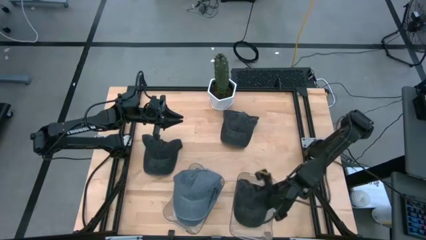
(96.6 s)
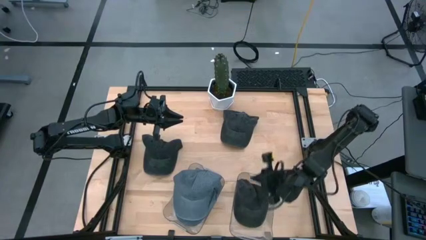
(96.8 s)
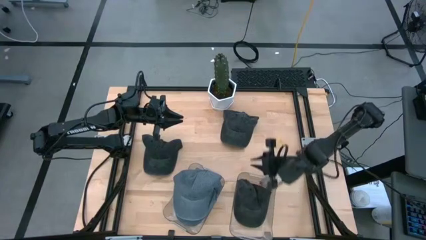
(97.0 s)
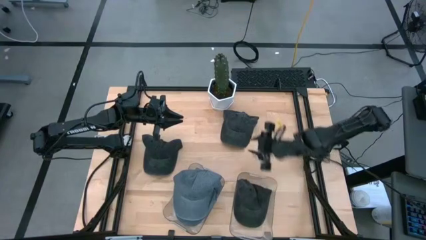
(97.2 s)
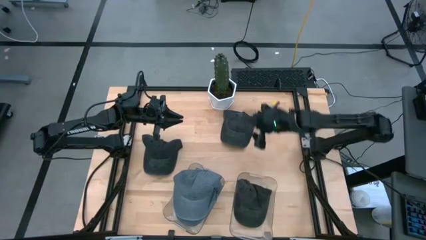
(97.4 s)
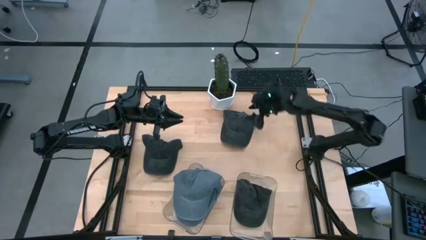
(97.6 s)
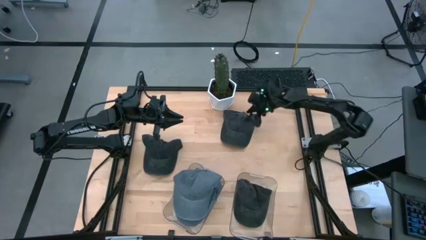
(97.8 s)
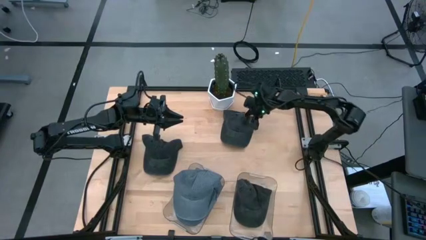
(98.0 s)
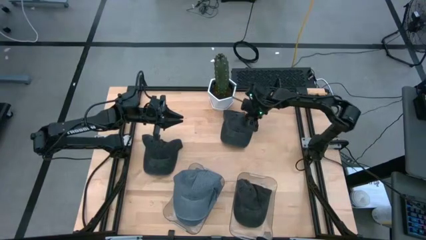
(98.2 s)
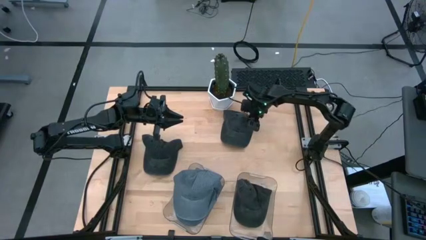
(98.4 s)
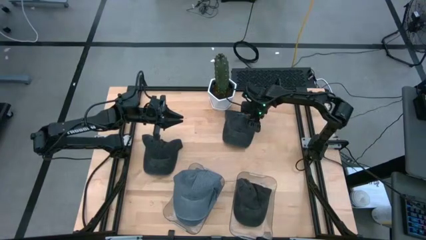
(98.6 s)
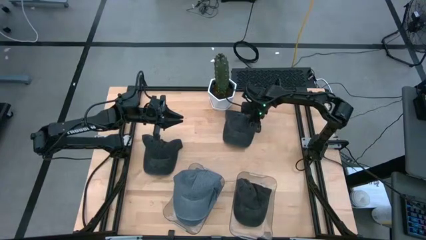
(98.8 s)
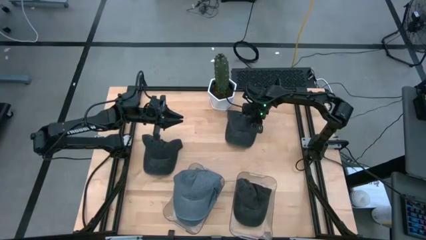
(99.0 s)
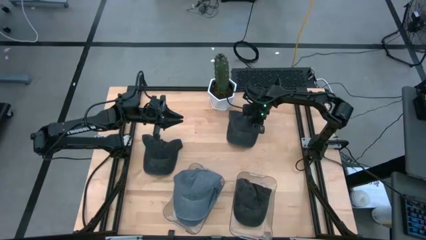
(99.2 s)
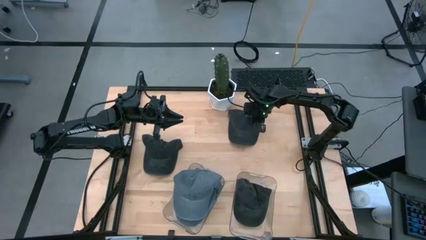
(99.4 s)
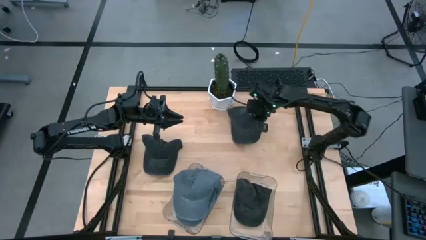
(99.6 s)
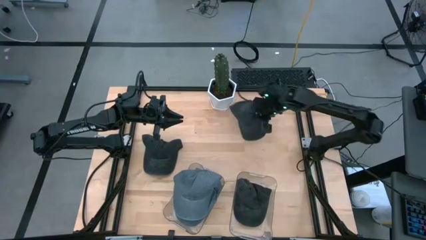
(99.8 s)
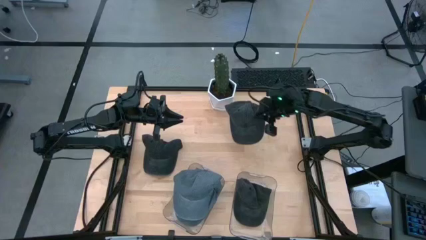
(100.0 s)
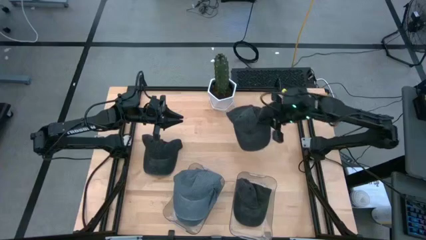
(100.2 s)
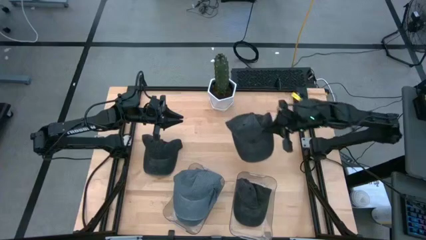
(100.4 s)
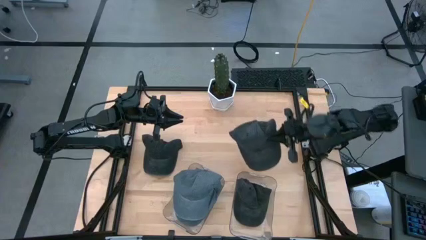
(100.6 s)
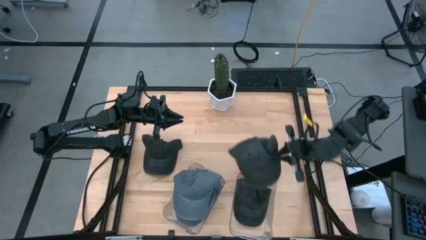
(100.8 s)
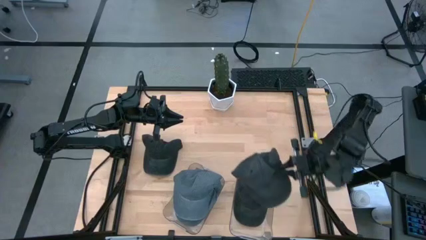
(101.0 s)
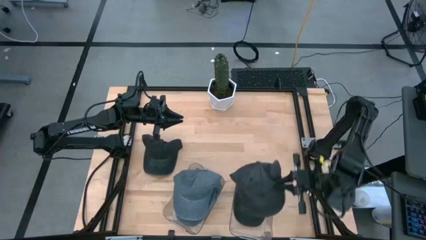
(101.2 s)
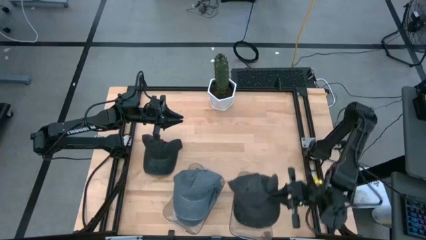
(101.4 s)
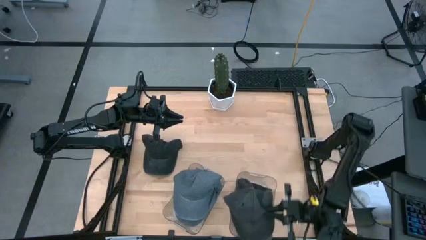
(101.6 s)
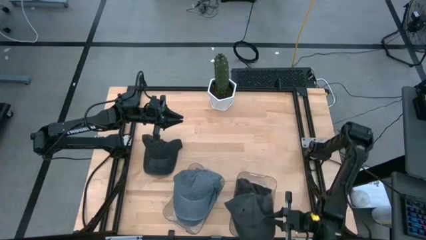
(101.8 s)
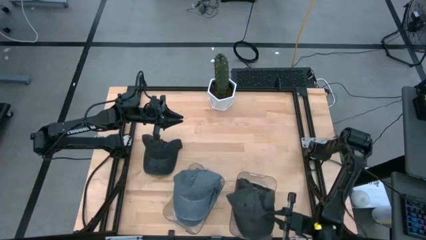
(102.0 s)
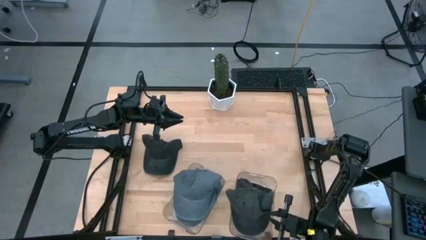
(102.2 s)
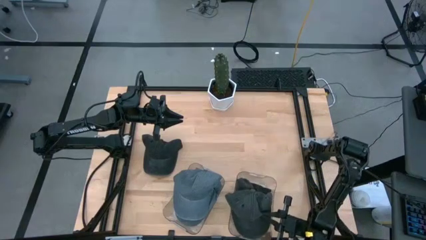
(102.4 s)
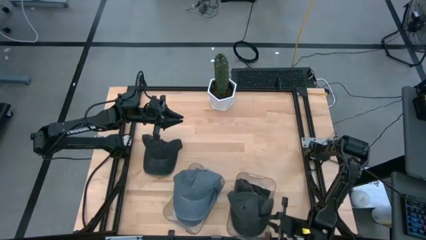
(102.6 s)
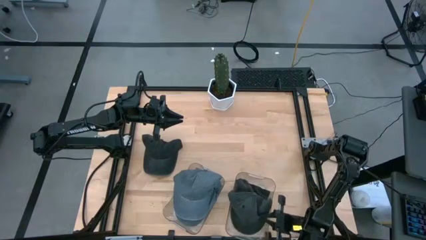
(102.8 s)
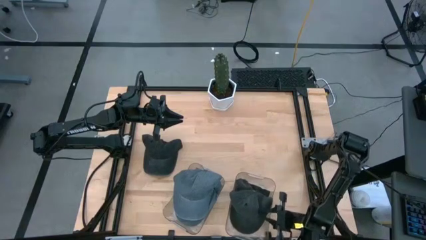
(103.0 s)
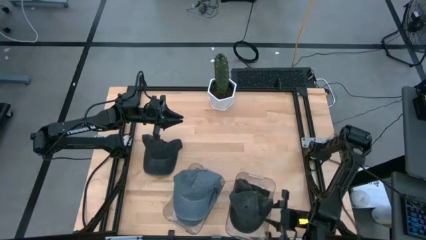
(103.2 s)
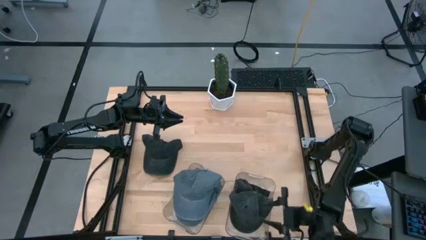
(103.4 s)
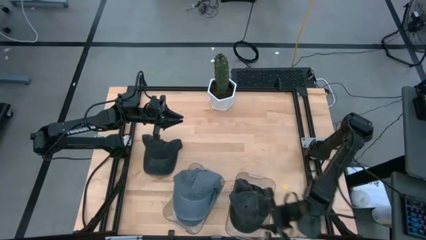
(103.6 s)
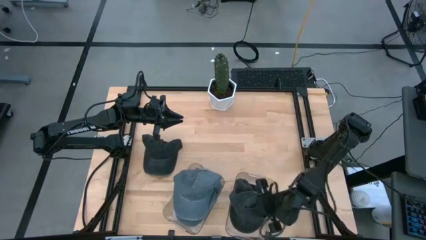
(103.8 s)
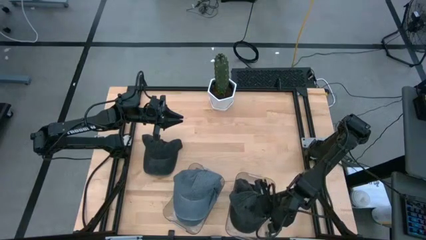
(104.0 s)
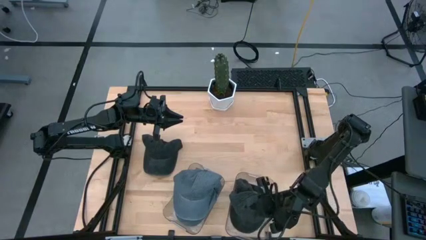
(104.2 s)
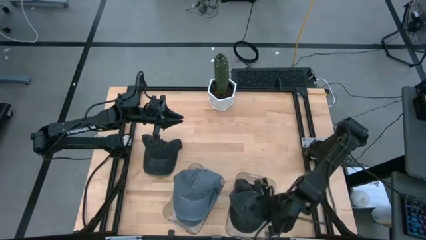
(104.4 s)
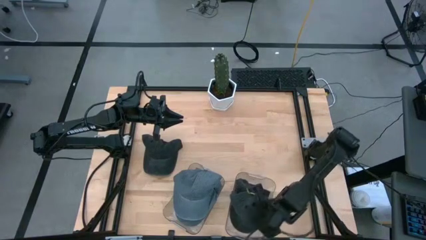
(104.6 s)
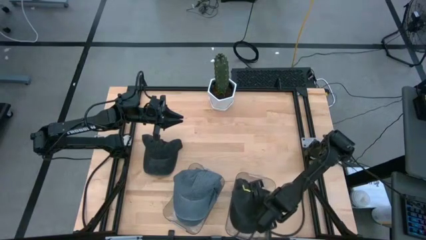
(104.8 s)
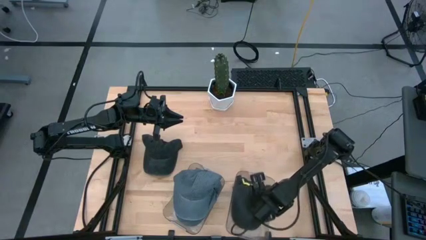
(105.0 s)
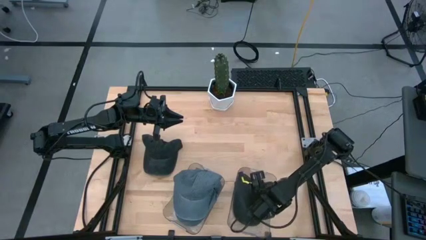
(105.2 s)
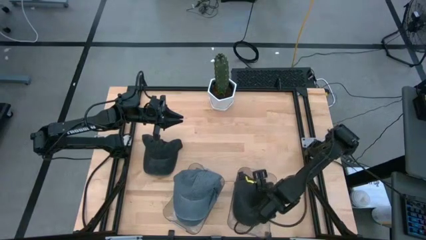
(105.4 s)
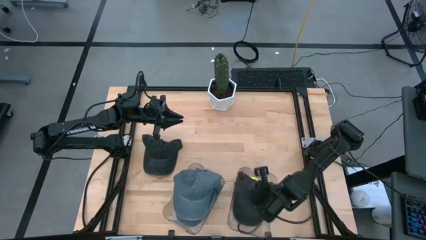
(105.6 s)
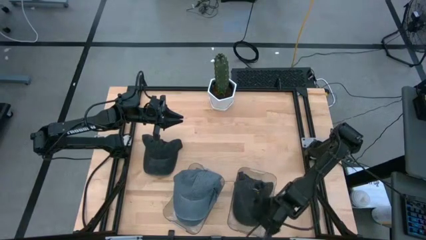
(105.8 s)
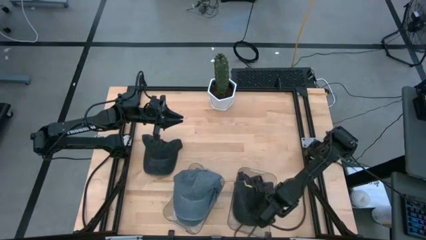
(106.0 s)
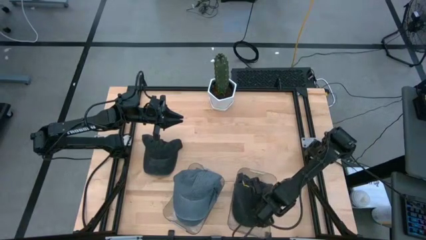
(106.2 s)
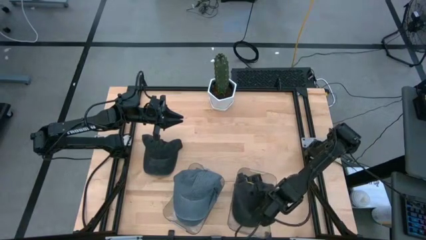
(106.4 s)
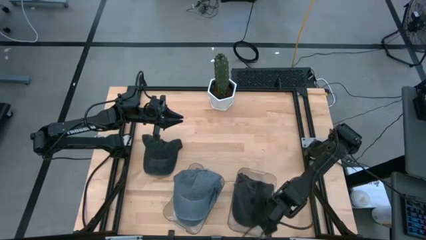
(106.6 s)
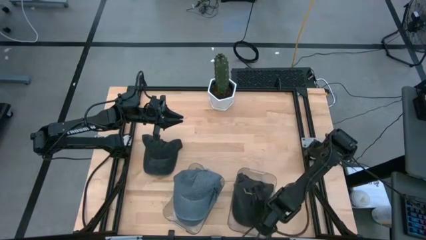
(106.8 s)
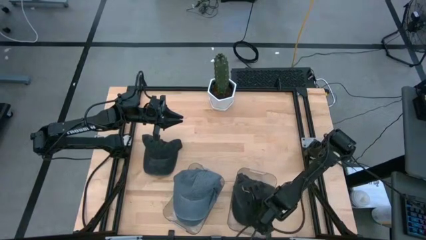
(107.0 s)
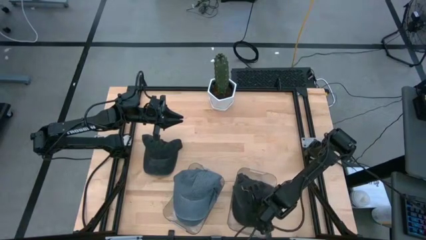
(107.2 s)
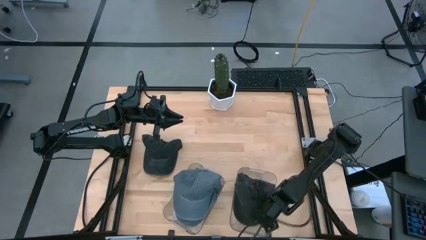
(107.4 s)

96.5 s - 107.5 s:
Task: Pick & Place hat
Put the right black cap into the right transparent bin

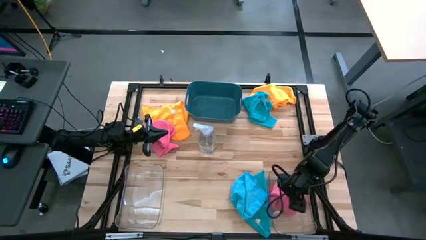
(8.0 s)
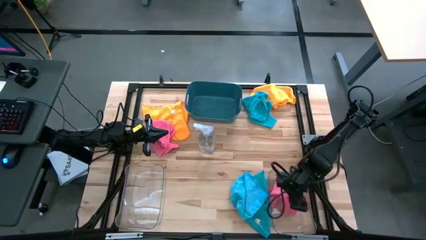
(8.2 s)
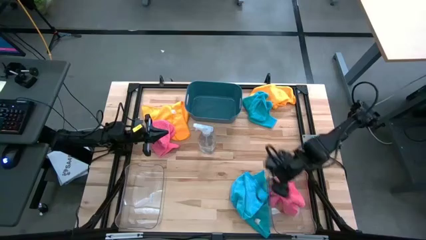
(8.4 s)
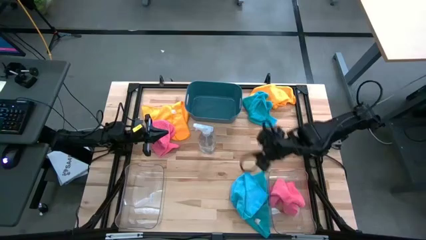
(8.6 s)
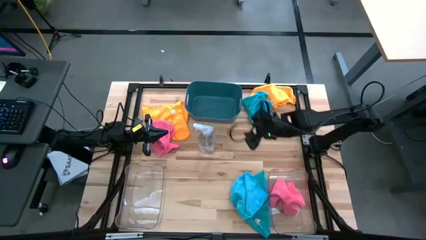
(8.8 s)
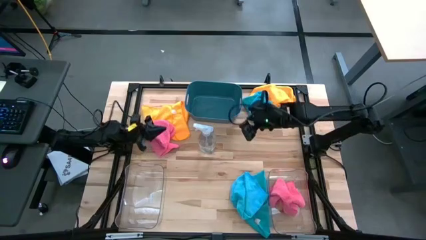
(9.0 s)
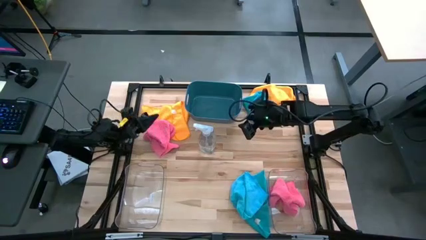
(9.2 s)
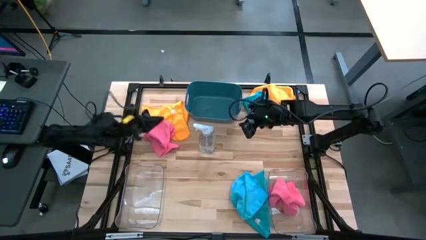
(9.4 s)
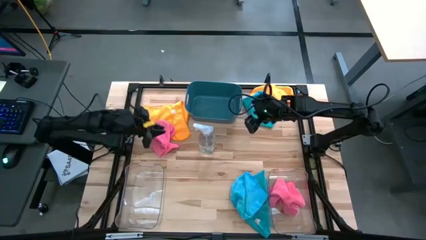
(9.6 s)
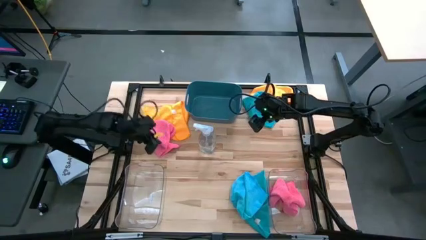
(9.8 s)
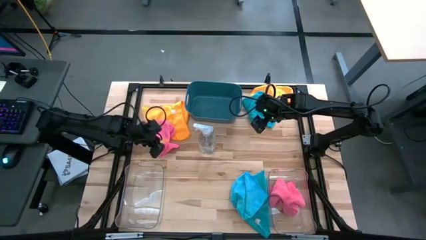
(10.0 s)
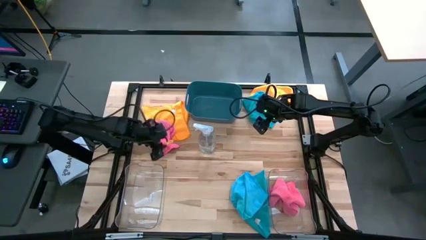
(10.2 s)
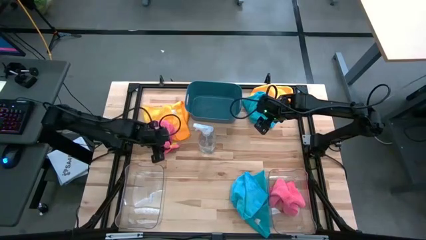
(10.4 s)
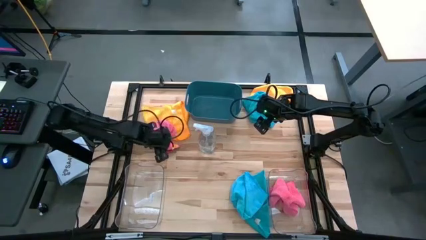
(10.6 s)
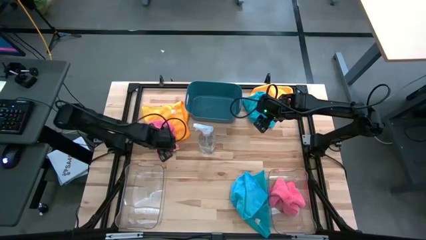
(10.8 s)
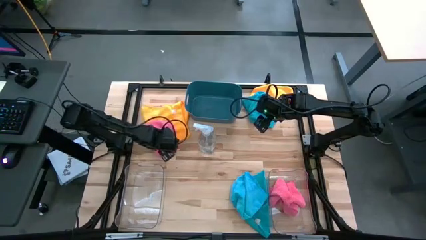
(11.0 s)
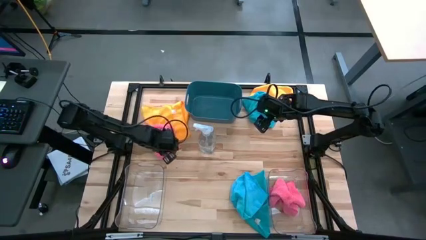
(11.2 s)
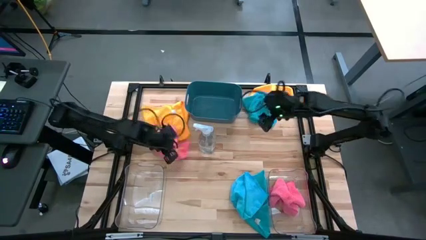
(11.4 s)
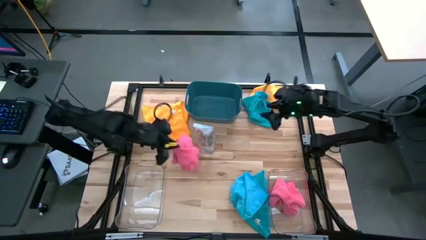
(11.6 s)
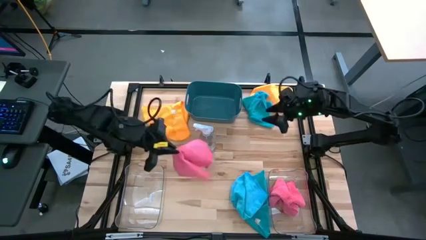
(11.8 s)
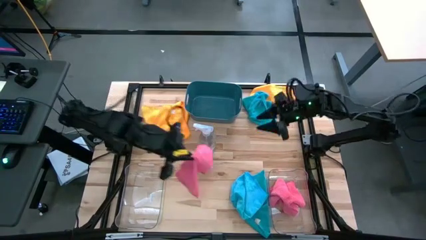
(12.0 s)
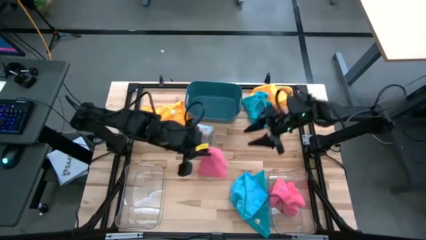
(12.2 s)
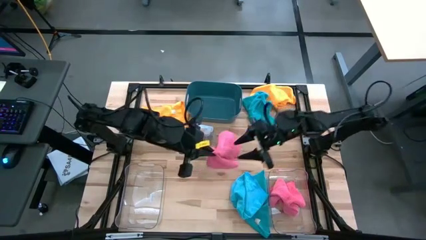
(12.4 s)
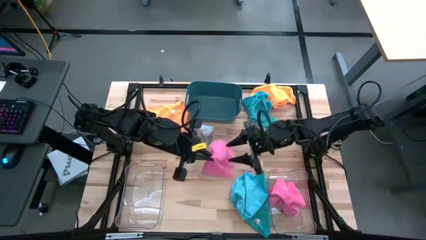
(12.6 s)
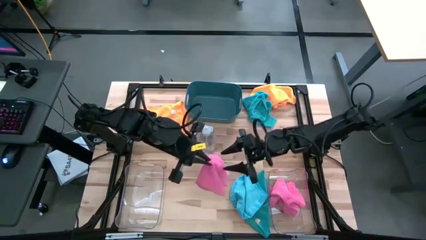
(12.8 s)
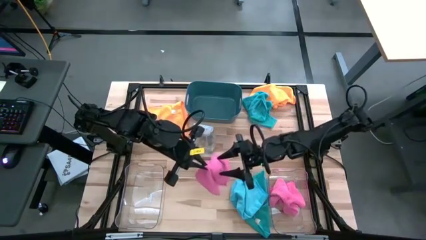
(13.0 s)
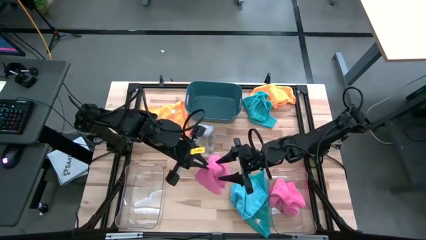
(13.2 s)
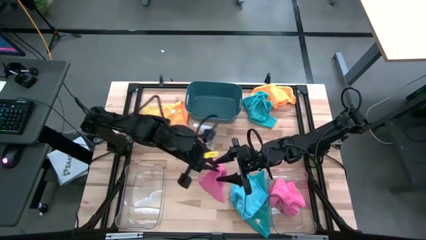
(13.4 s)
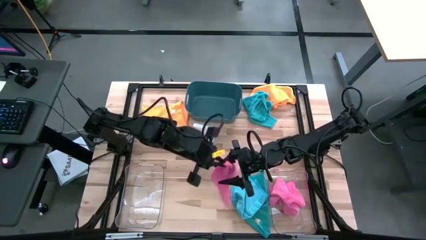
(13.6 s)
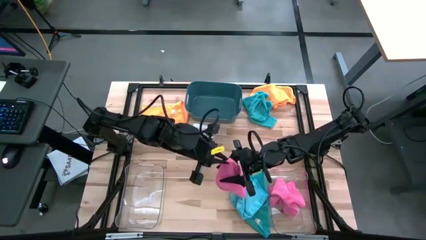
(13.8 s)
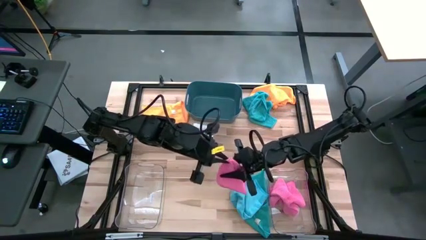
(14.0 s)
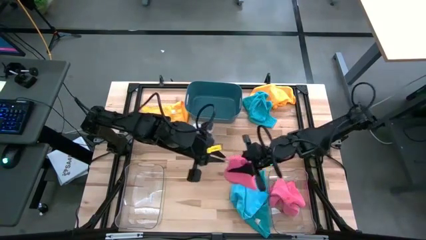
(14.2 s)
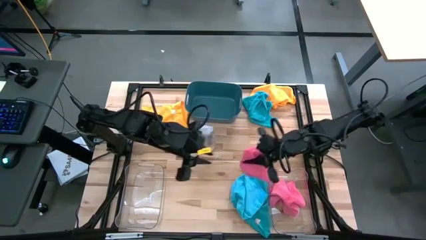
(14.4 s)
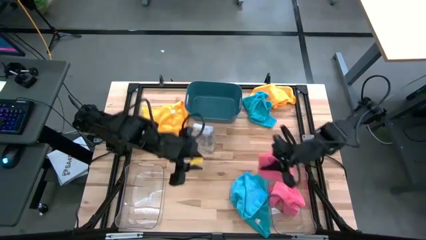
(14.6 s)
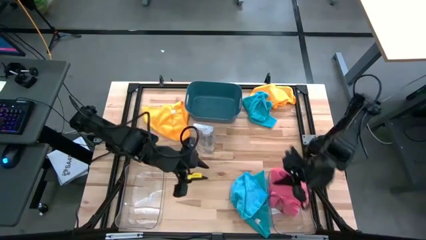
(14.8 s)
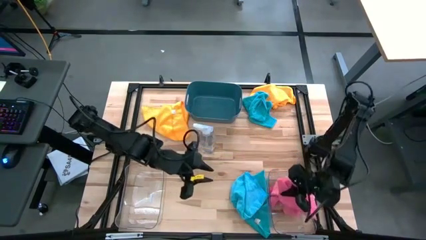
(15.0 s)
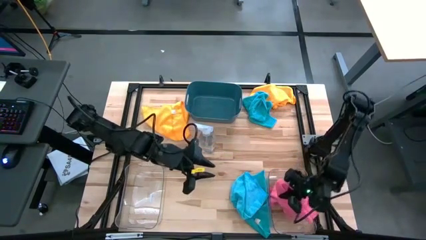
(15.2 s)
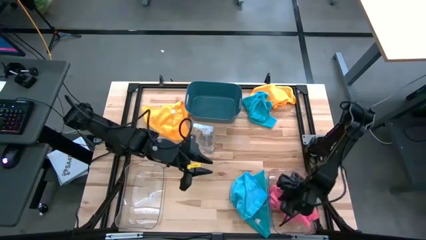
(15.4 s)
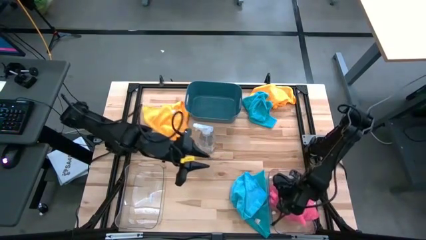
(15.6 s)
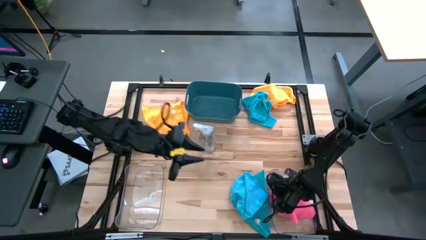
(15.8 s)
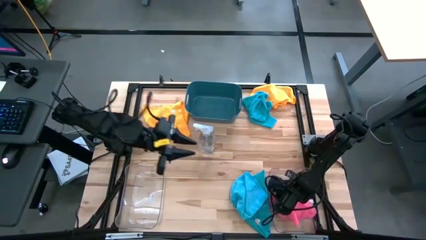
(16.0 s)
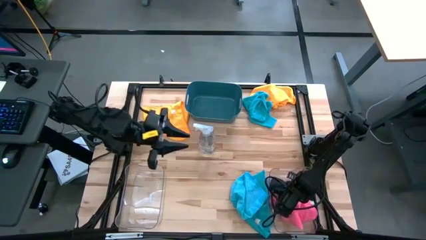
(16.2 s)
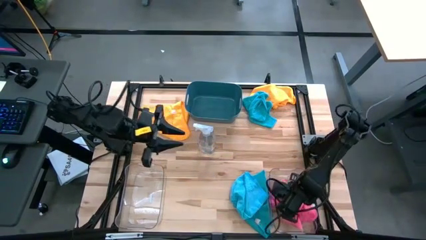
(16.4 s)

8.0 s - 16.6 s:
Task: Sort microfiber towel by color & place in baskets
Put the pink microfiber towel into the right transparent bin
